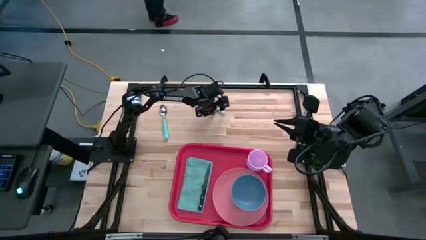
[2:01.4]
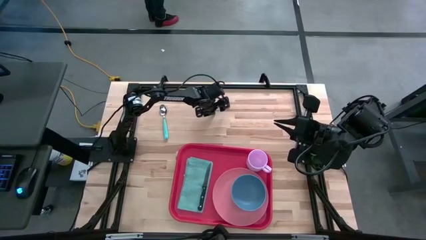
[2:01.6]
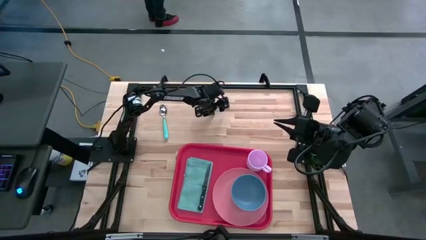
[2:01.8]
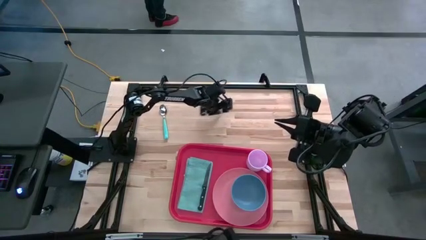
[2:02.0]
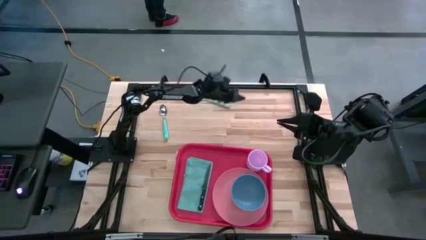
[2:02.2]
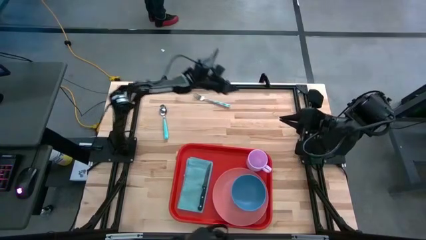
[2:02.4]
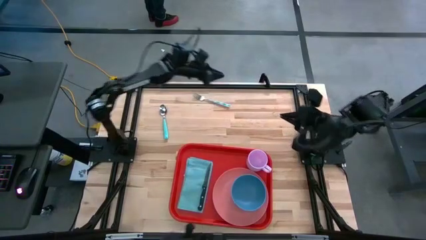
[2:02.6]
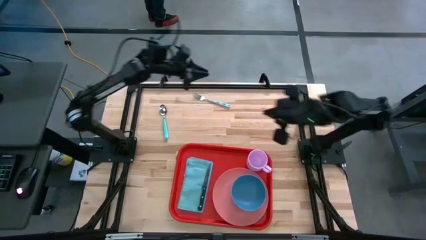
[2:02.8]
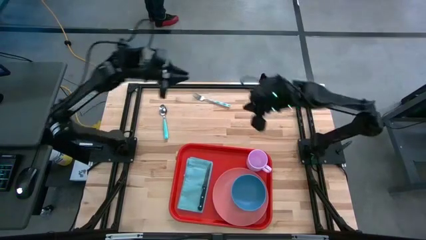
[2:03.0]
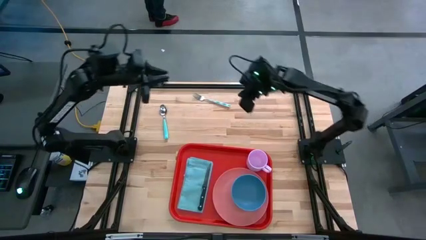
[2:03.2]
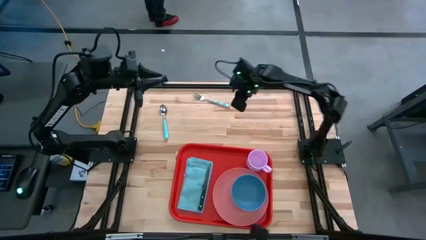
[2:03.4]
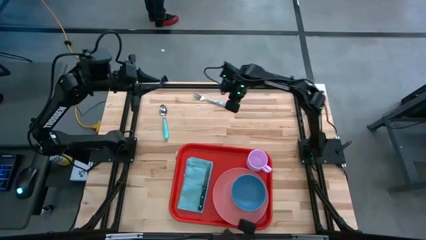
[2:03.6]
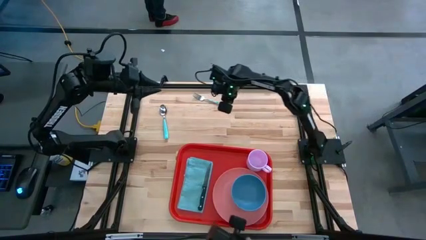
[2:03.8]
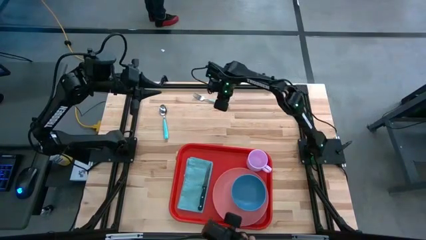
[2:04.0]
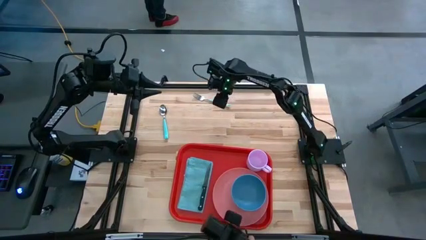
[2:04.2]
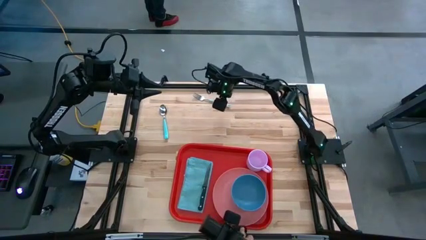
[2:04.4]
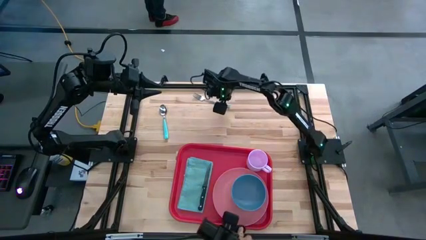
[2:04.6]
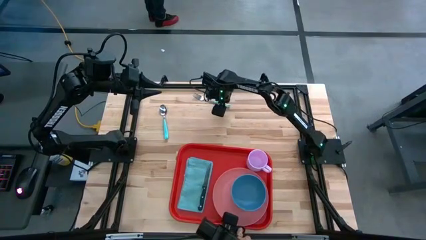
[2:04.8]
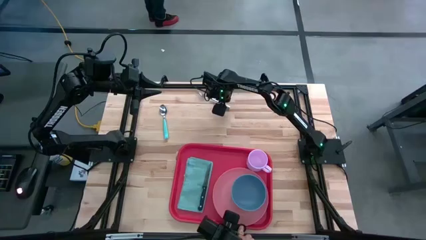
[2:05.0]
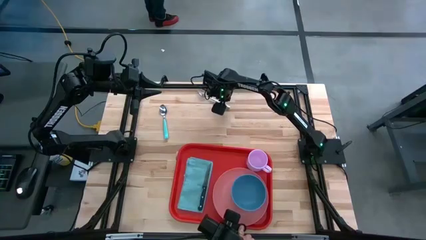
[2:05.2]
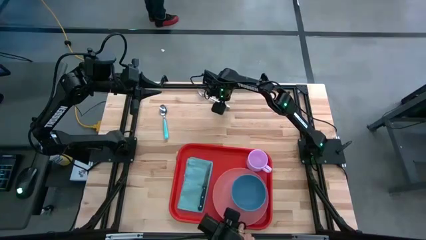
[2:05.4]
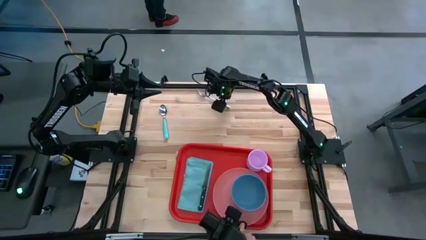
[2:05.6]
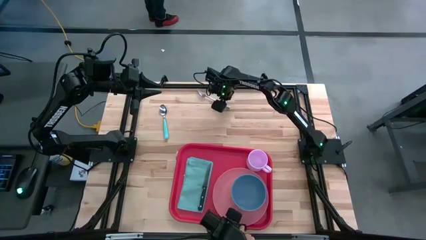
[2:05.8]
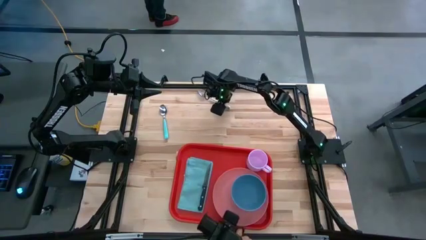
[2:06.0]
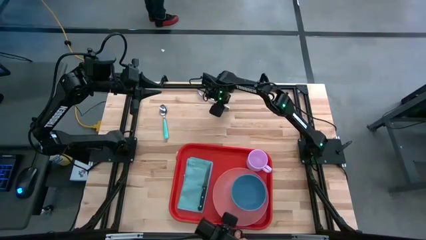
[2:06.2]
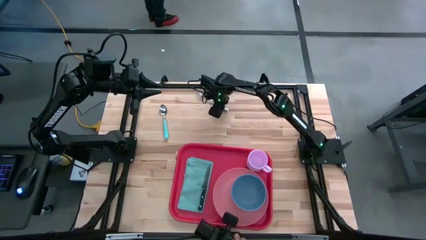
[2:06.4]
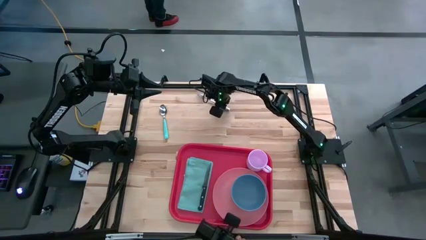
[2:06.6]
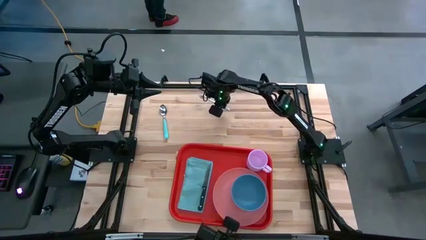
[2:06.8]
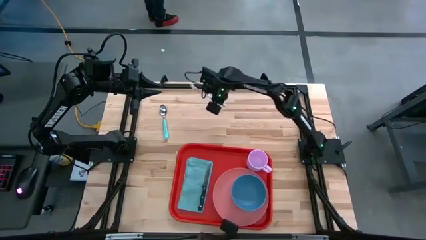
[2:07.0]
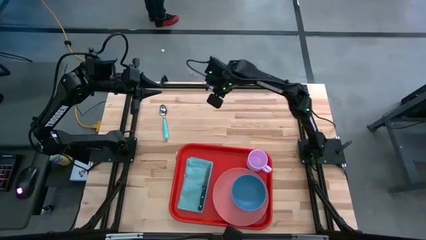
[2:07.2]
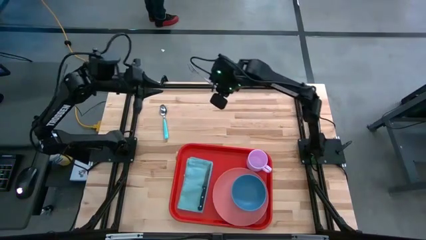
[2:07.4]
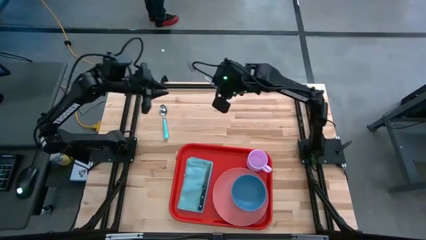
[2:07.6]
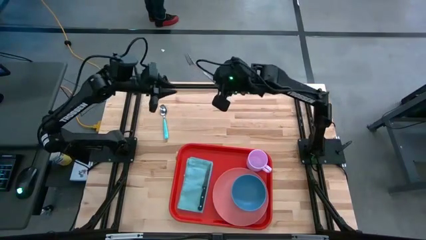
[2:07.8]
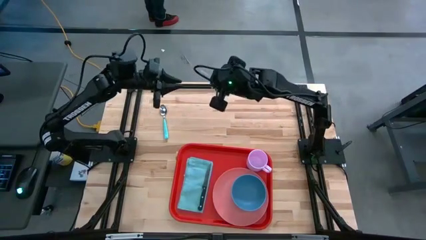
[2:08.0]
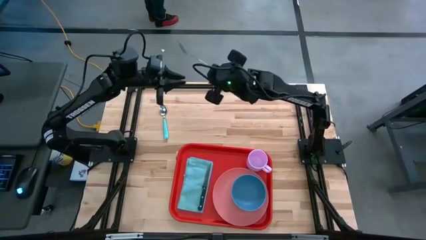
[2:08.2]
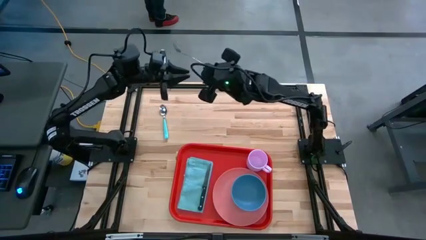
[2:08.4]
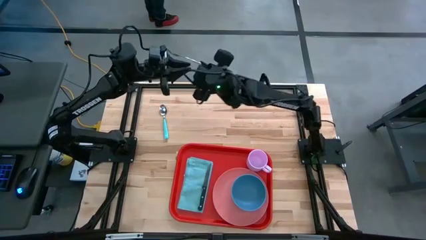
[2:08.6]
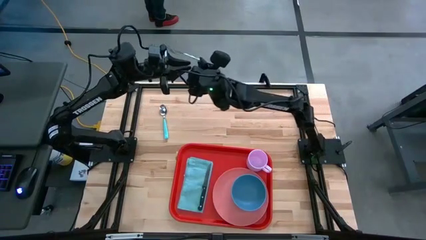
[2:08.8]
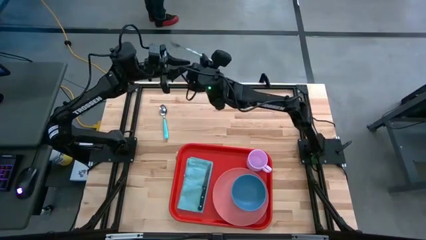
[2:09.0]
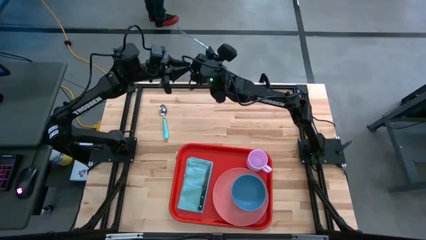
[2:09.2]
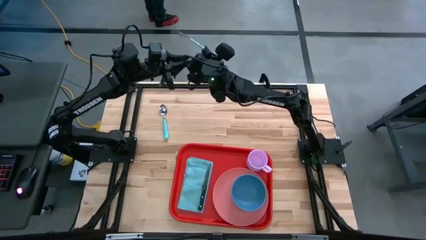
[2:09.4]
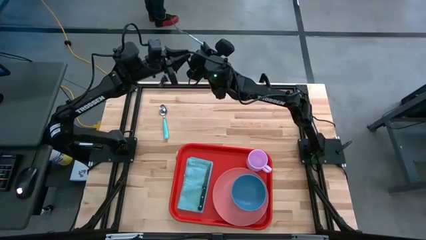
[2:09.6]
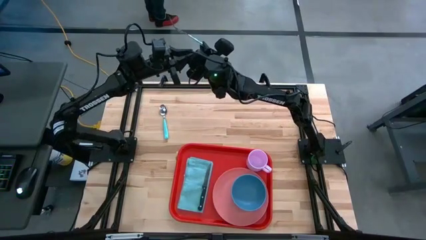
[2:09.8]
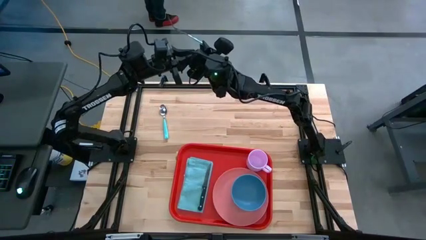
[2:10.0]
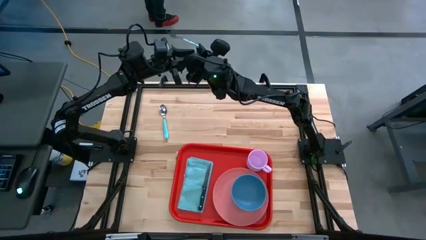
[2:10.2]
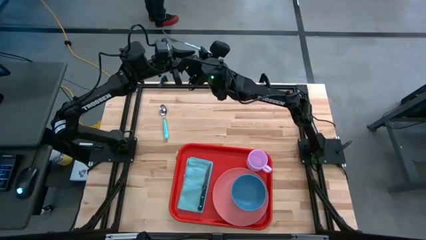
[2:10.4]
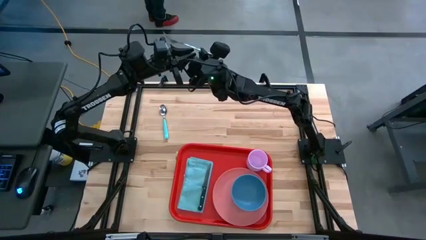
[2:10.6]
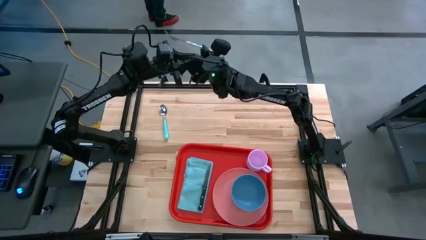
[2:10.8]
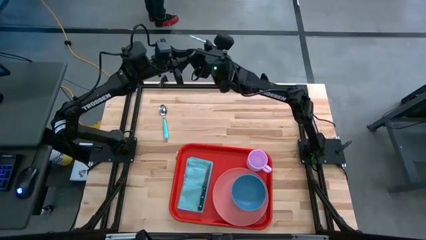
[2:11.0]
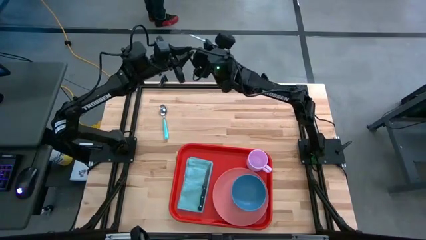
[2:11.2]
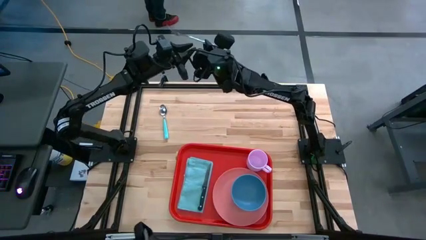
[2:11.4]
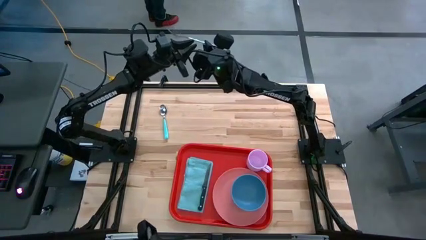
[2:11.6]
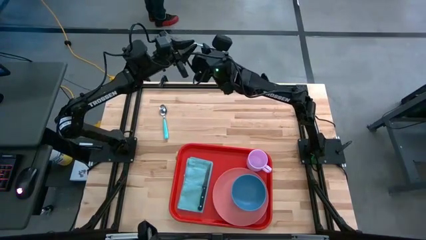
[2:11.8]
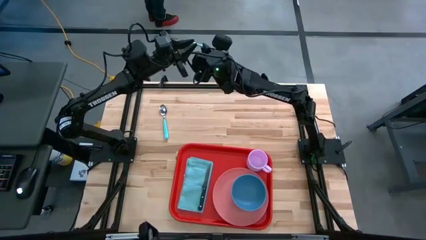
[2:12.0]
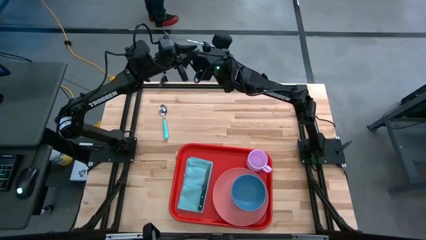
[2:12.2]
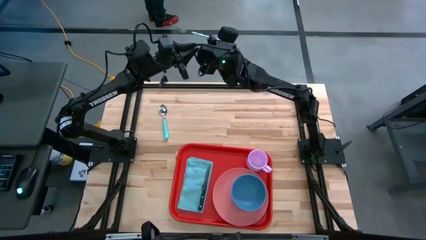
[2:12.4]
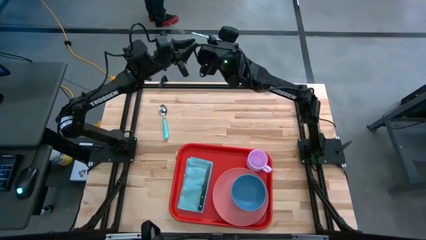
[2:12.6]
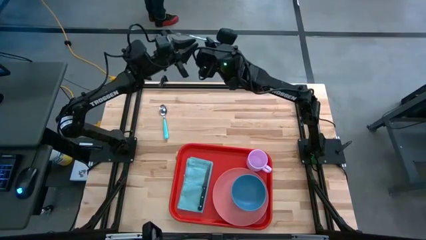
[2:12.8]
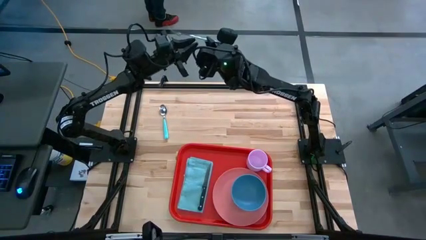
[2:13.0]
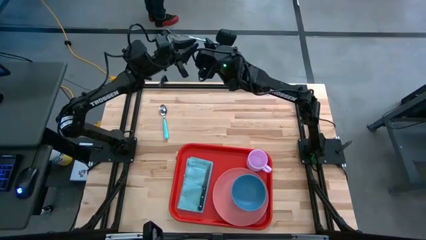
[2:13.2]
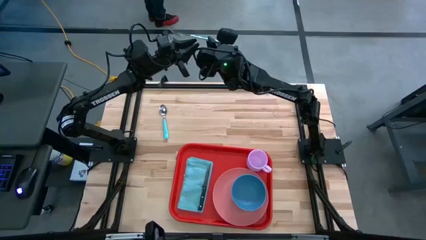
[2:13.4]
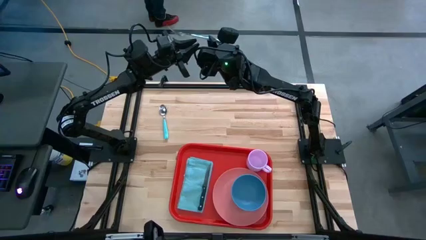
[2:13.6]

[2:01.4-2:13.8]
Task: Set up tray
Put the blue fork on the blue table napkin to the left of the black table knife

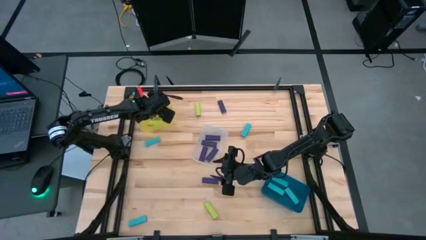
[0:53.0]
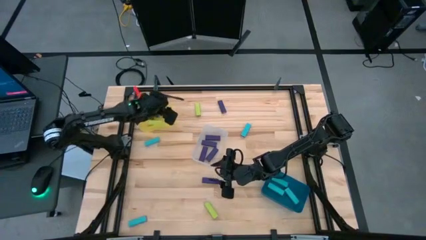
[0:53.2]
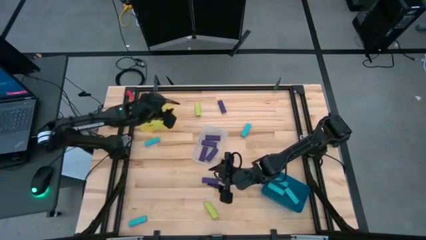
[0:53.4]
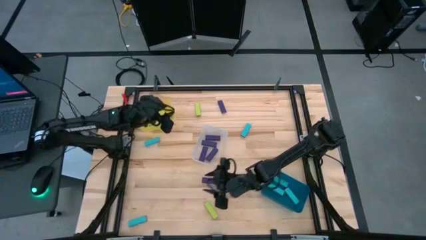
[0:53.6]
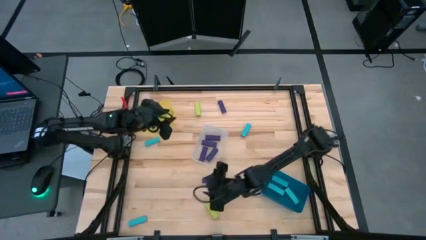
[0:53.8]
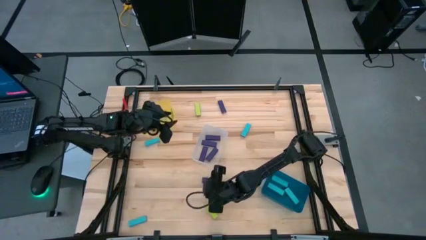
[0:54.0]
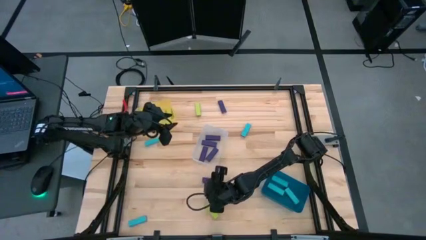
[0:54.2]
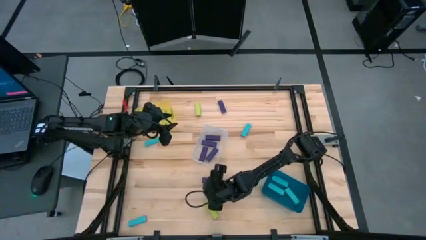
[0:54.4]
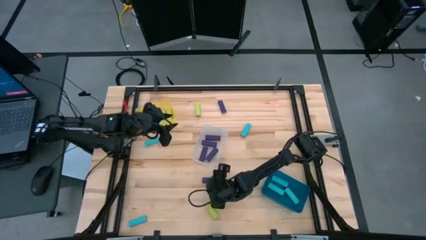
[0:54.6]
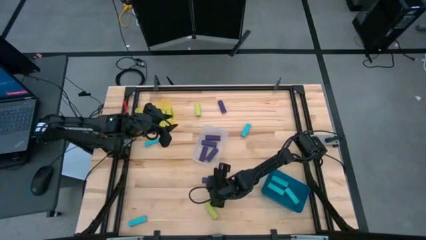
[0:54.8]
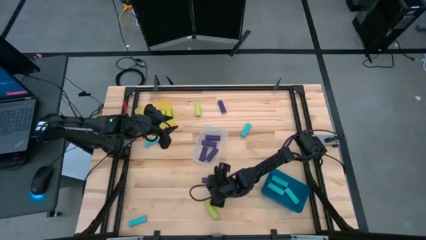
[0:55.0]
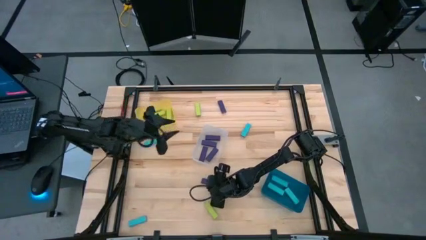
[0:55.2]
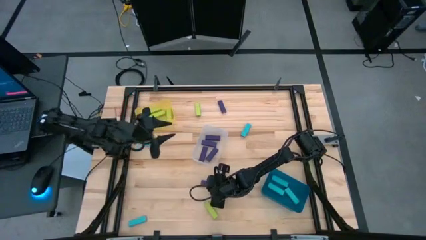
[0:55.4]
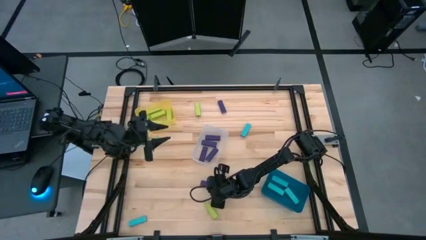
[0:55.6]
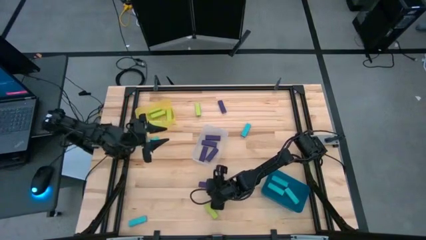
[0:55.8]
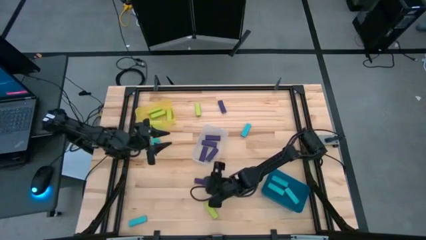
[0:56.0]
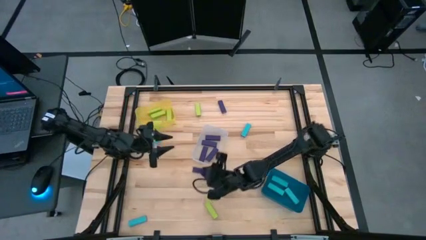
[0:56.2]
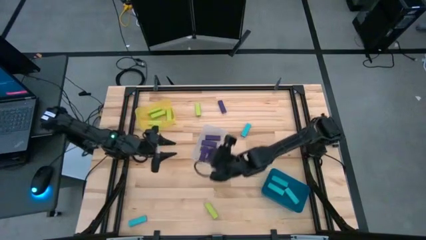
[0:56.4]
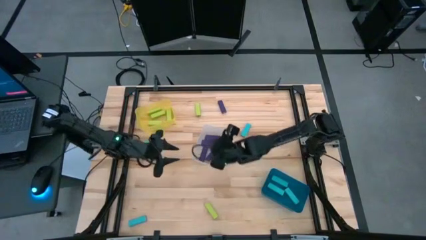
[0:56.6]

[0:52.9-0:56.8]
Task: Sort blocks
Put the bottom violet block into the transparent bin
